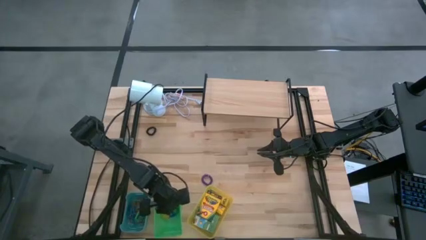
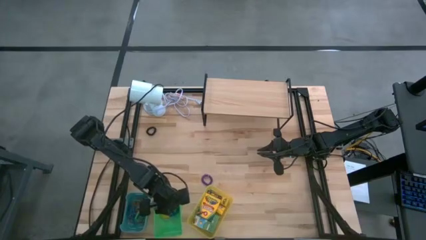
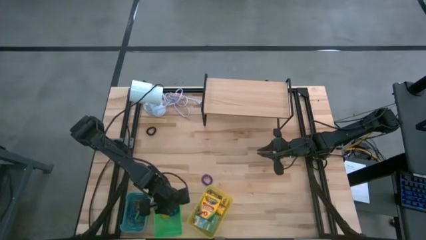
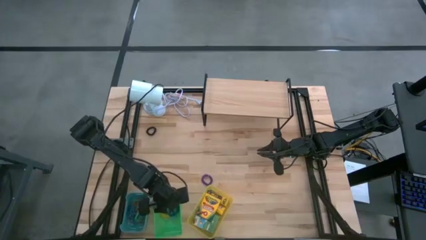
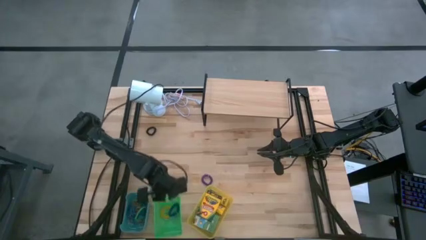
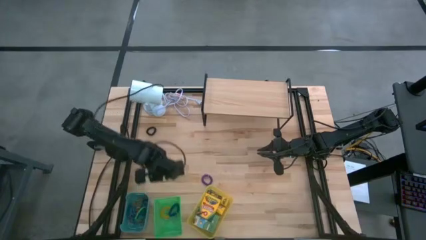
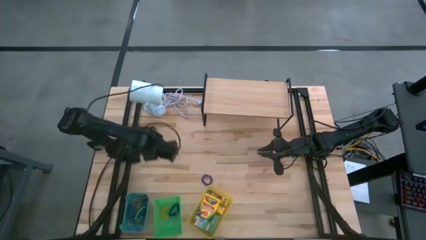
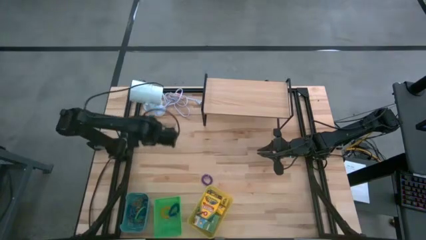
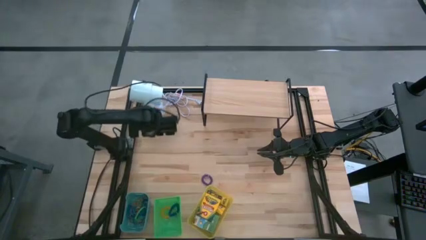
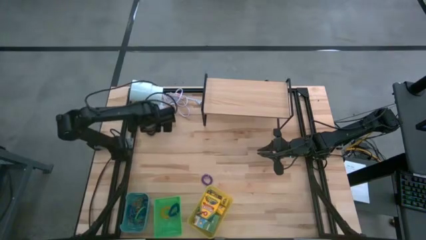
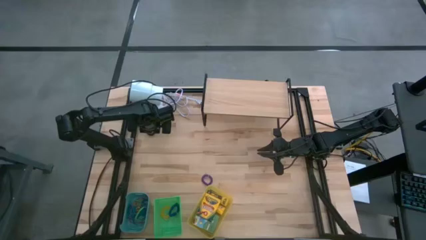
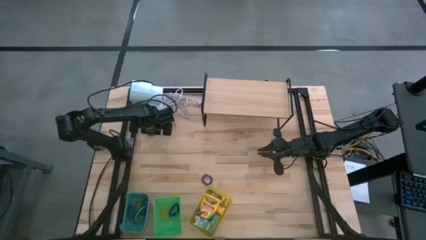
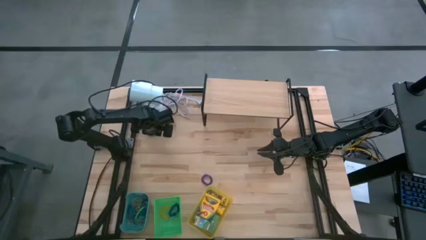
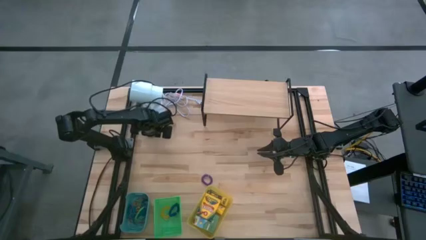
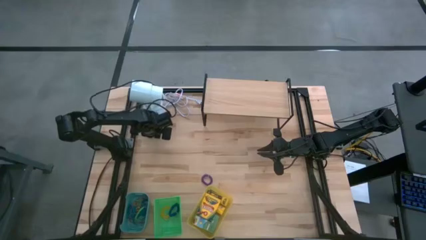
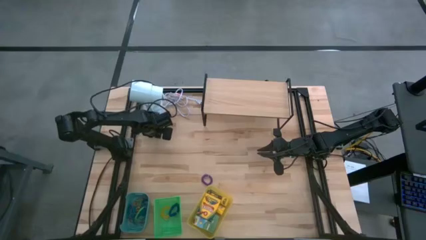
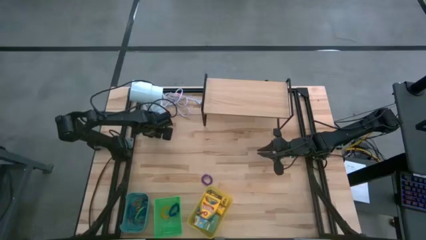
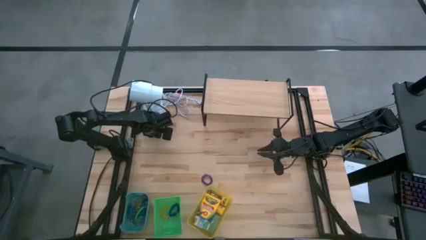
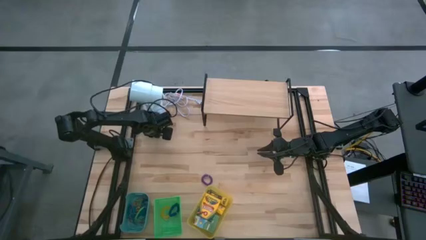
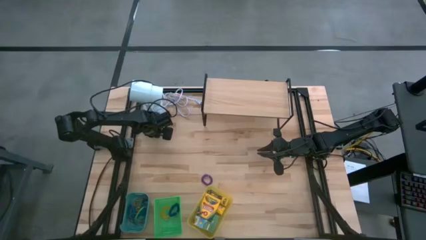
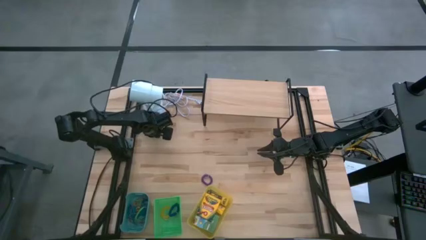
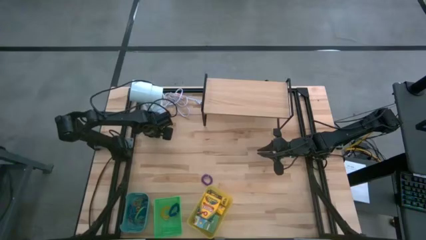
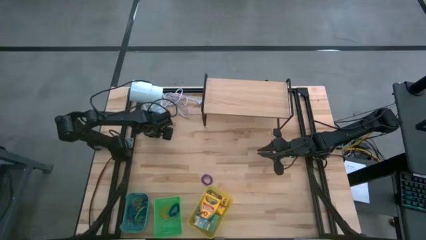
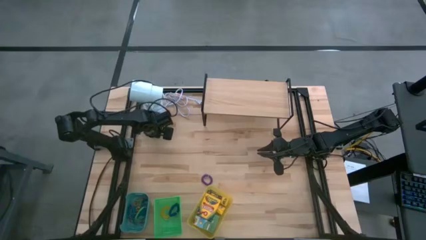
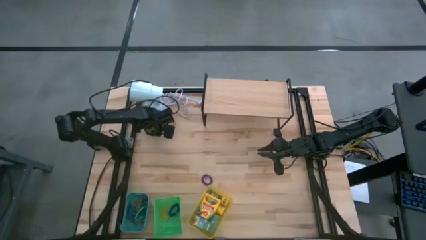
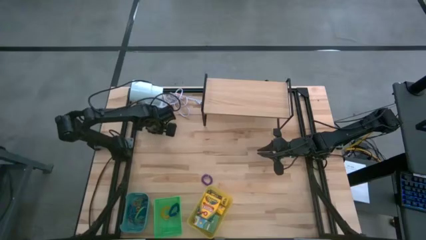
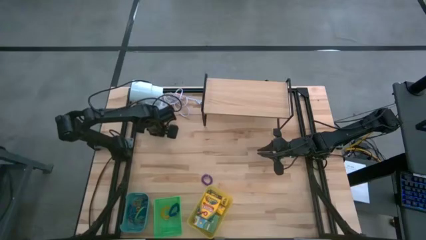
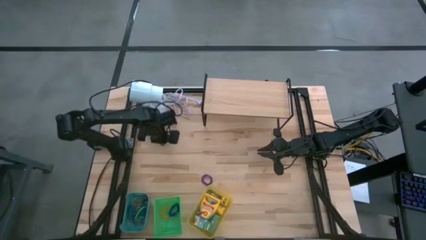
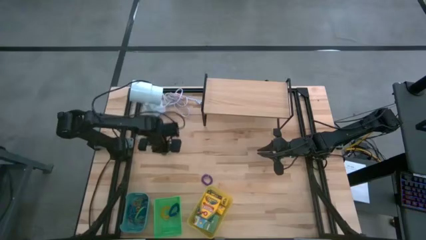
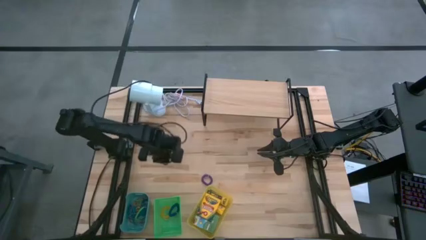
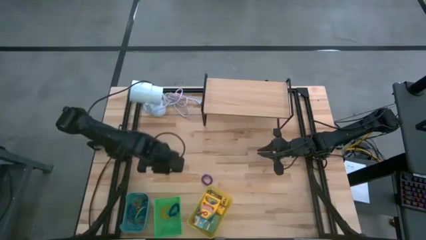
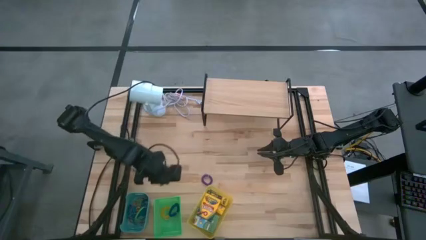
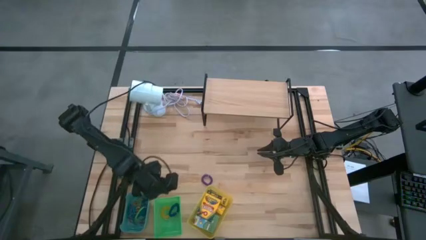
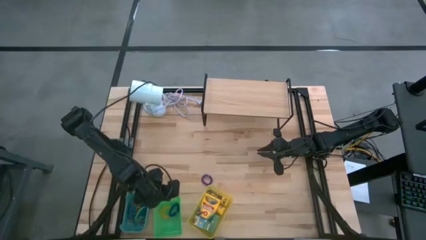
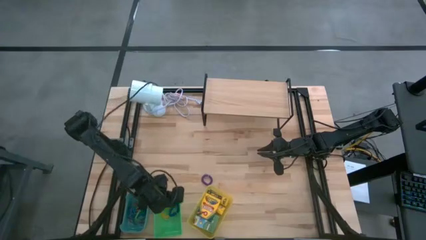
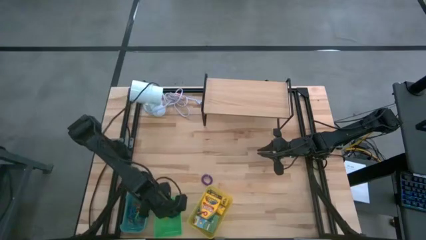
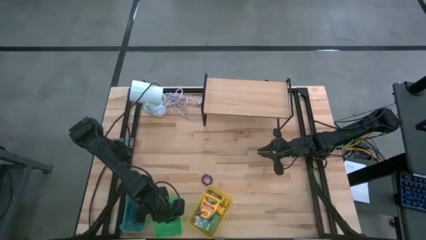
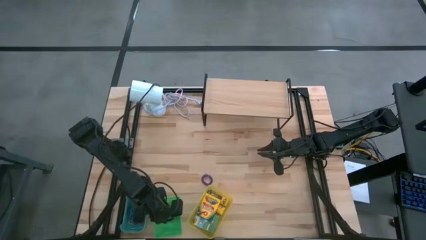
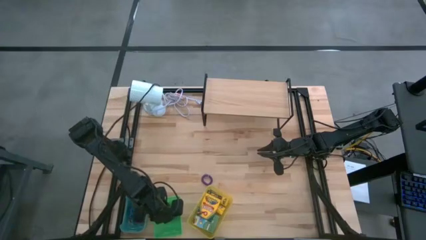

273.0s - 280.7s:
Task: Pick & Place Office Desk Supplies
Put the black spring rubberband into the green bin

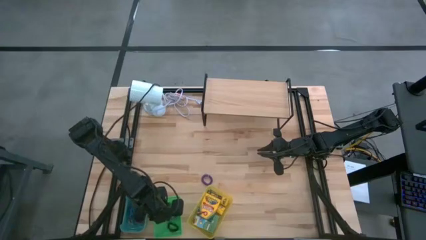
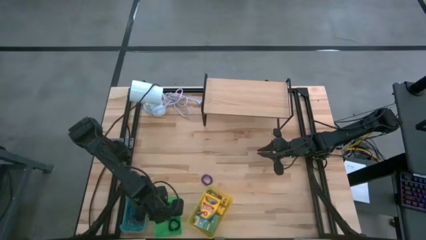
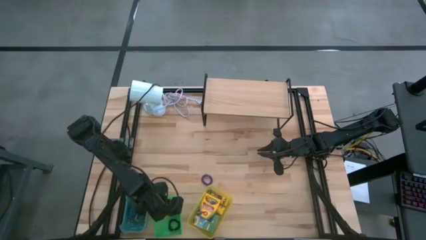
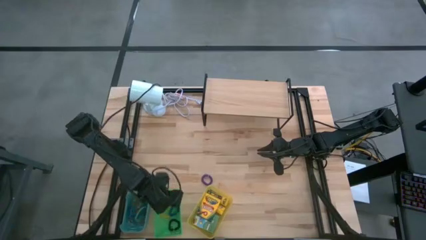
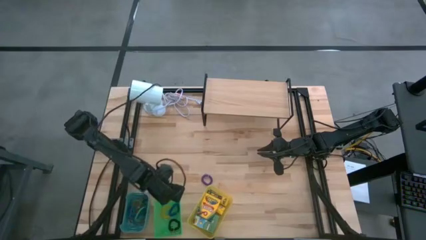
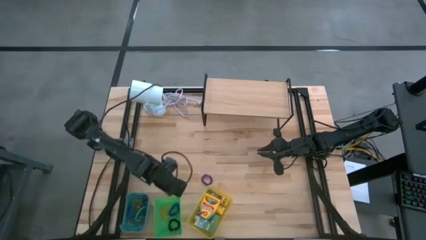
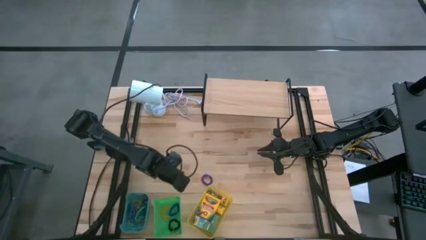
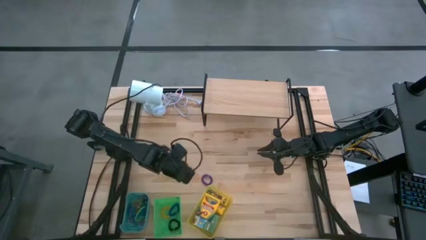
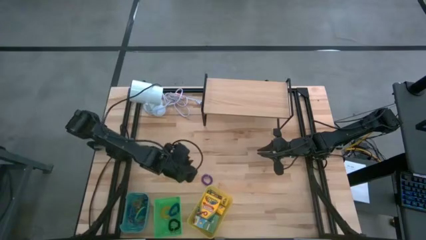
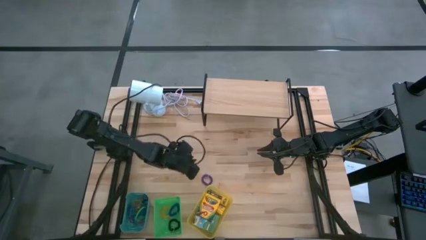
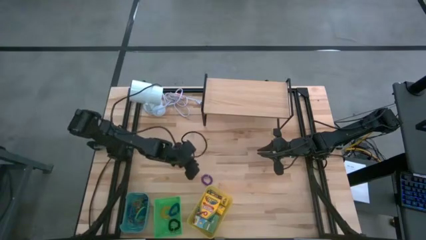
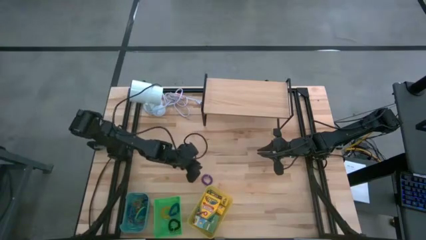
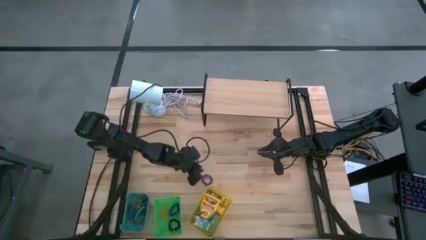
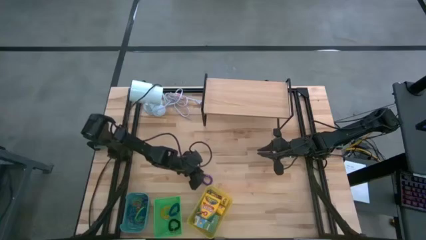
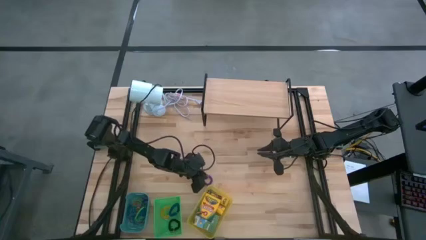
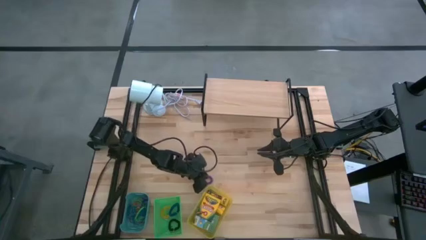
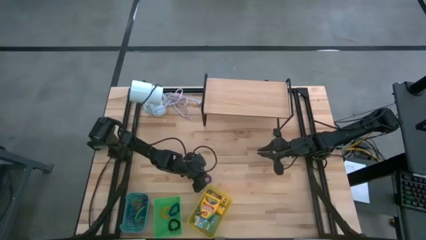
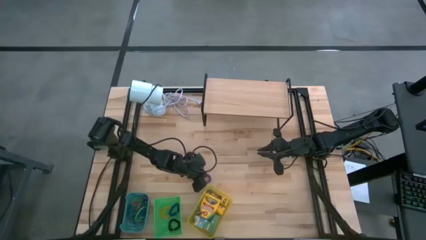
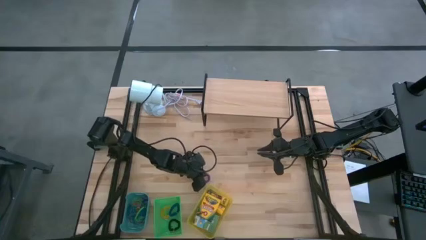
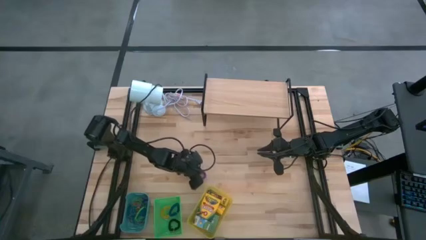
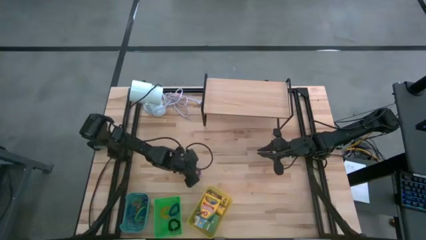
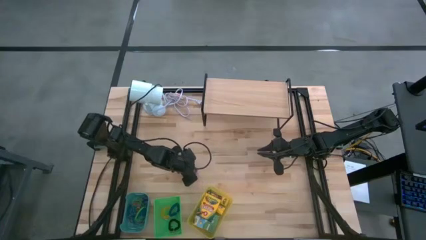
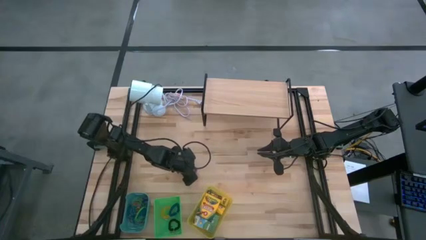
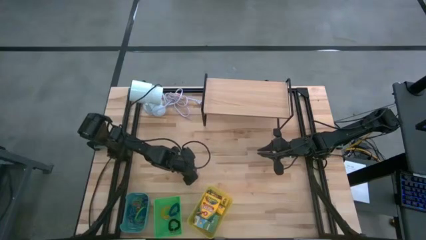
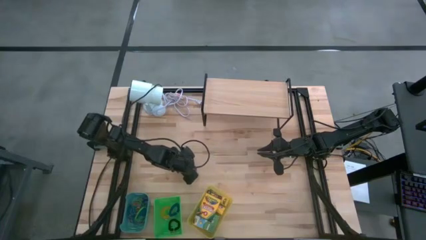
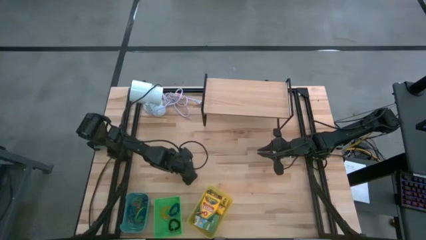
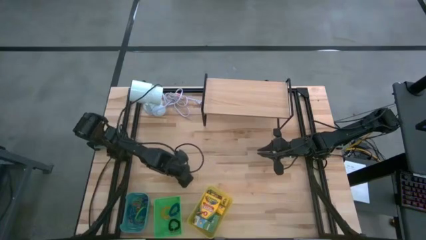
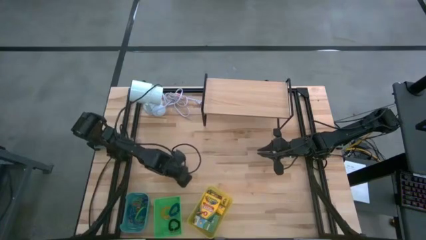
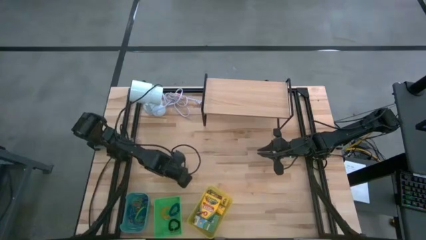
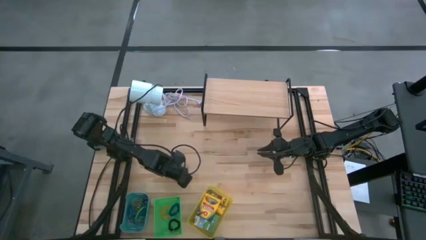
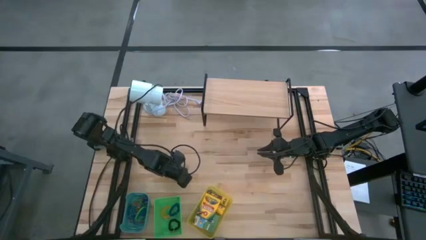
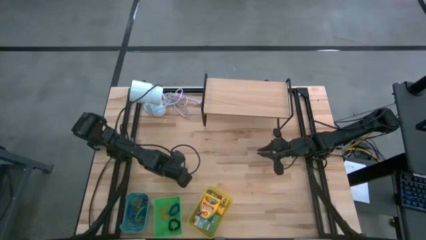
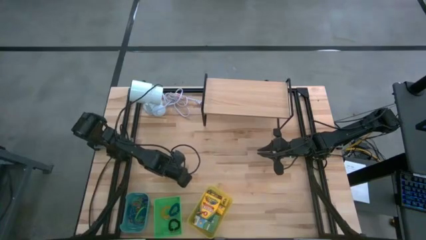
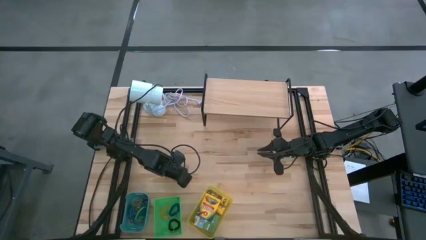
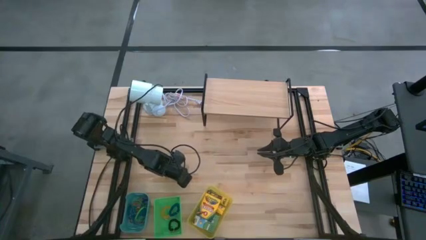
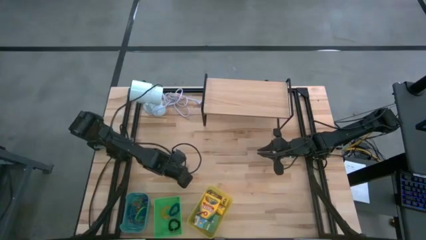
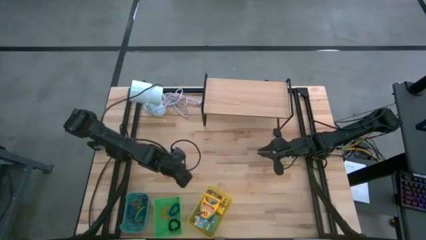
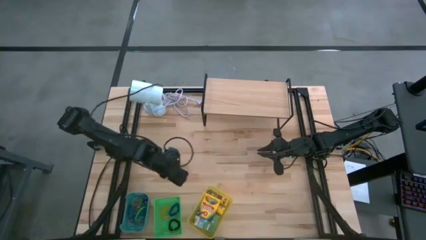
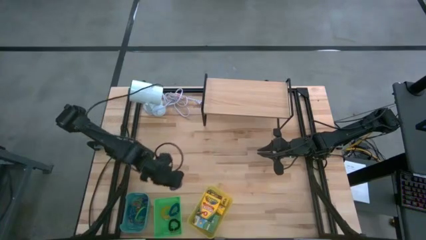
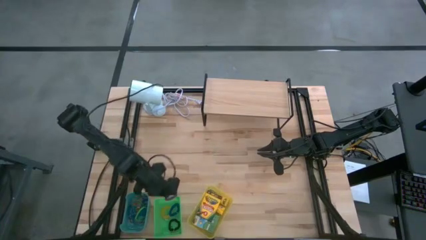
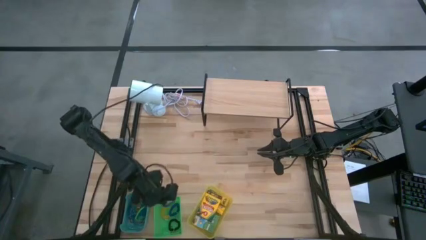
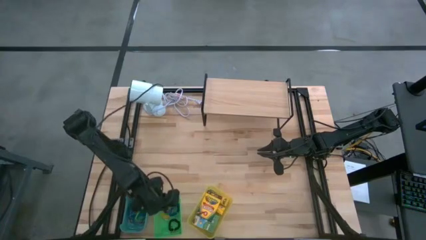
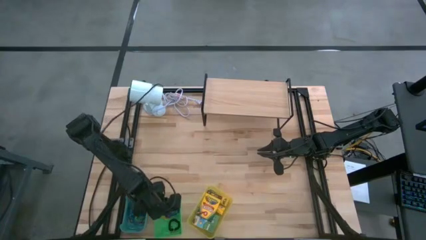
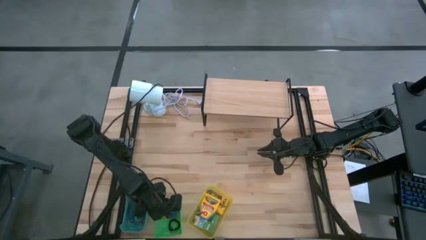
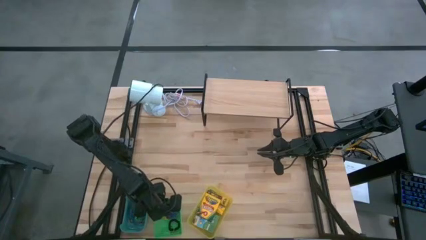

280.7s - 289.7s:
Put the violet spring rubberband into the green bin
